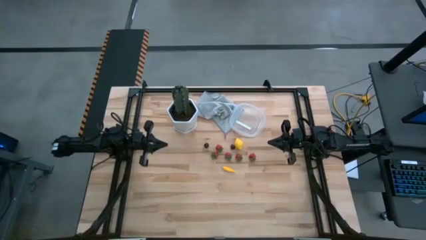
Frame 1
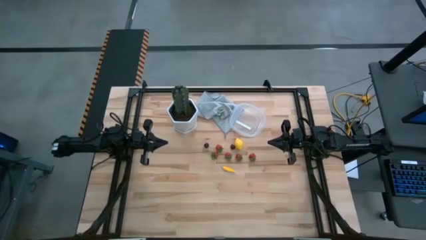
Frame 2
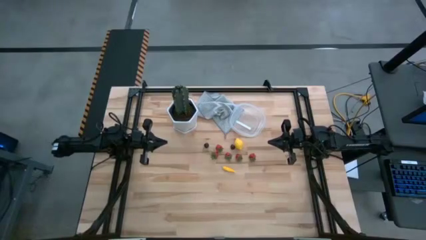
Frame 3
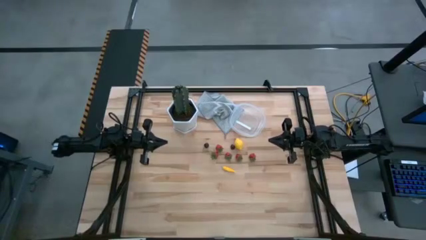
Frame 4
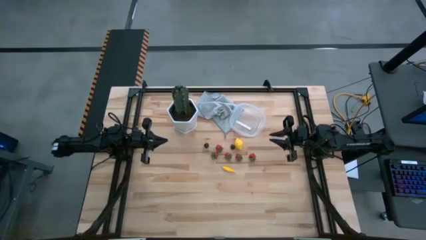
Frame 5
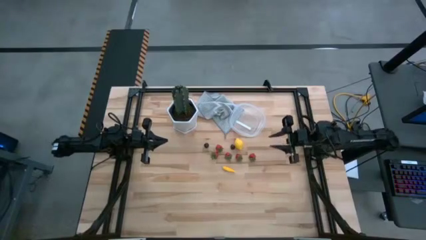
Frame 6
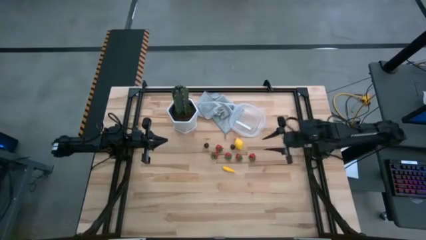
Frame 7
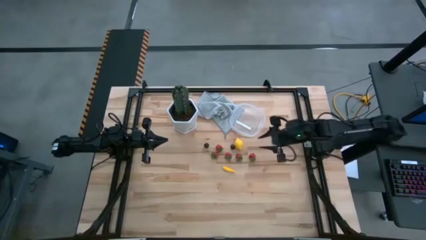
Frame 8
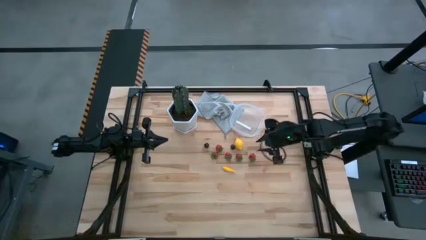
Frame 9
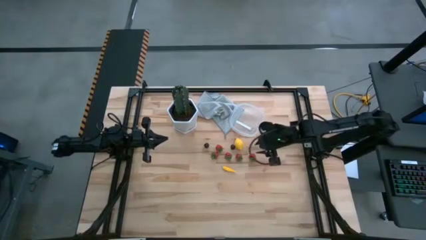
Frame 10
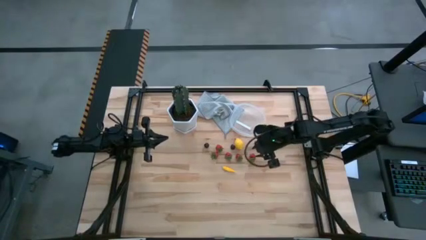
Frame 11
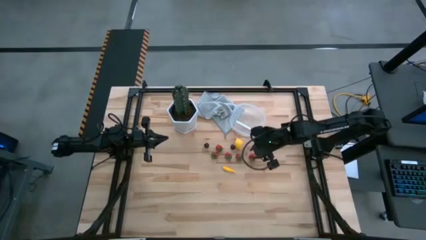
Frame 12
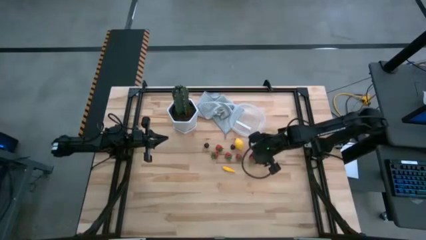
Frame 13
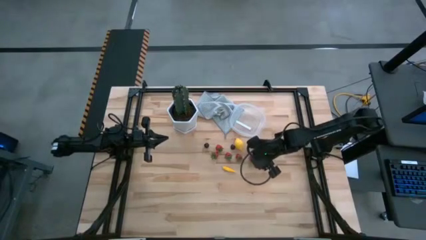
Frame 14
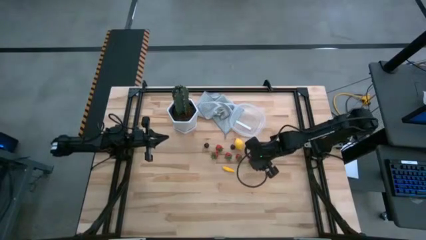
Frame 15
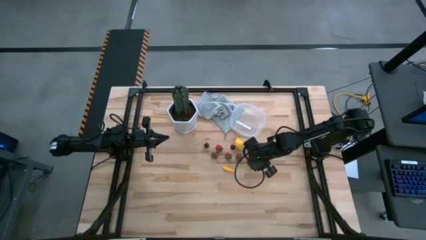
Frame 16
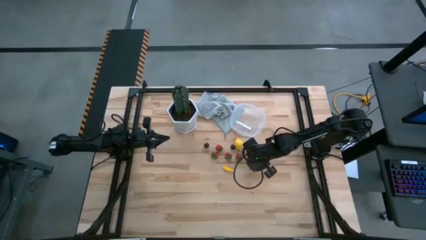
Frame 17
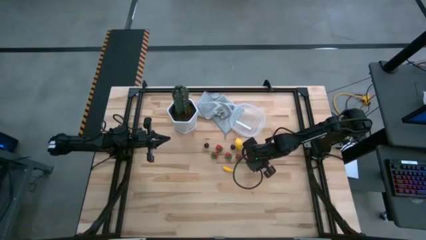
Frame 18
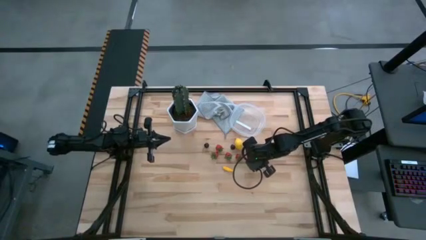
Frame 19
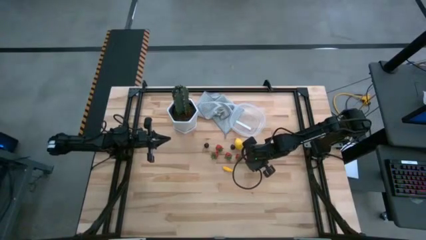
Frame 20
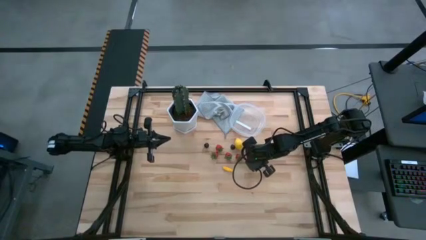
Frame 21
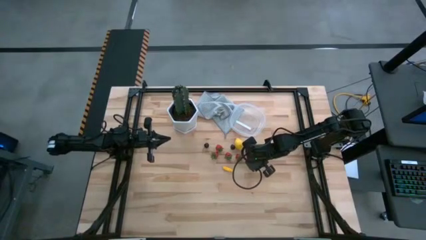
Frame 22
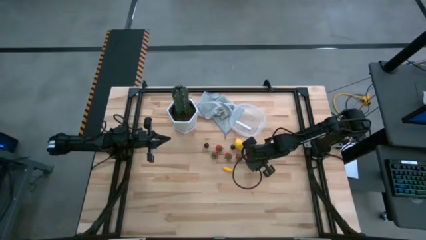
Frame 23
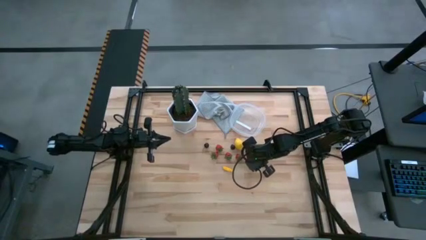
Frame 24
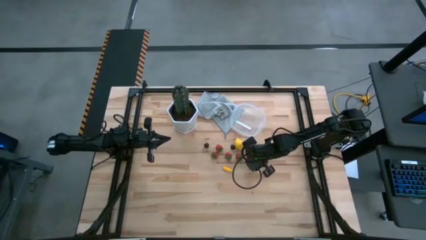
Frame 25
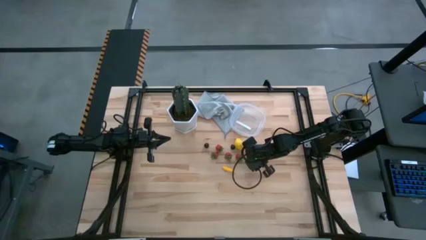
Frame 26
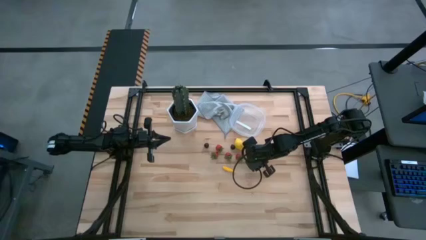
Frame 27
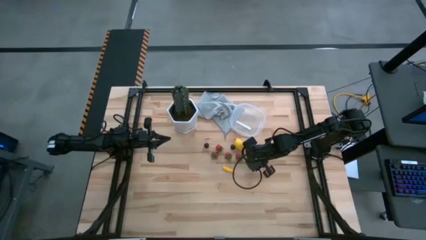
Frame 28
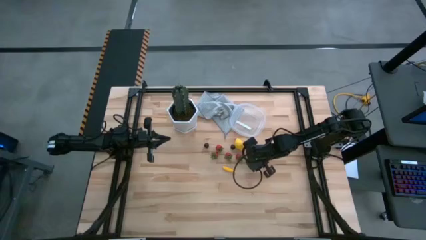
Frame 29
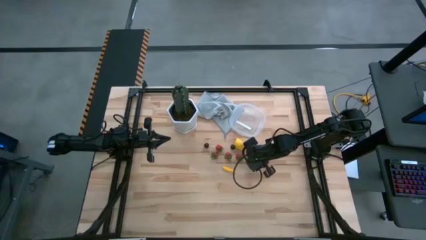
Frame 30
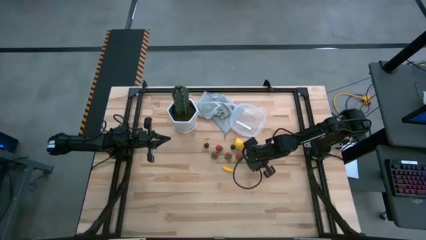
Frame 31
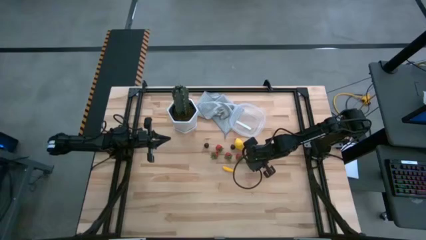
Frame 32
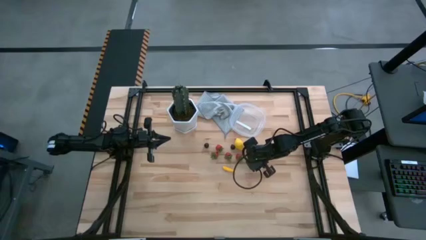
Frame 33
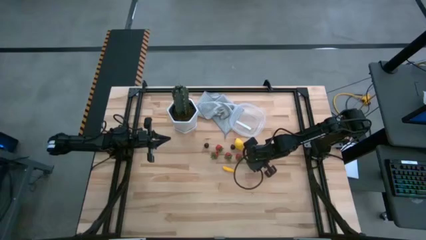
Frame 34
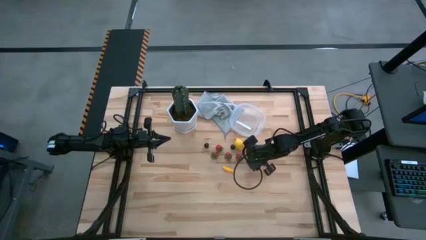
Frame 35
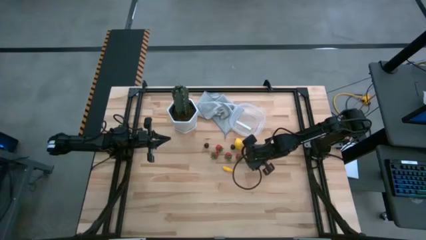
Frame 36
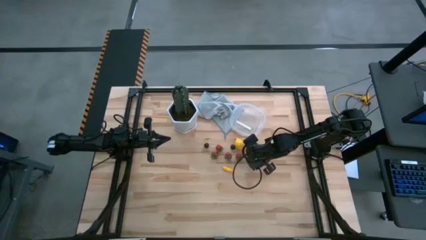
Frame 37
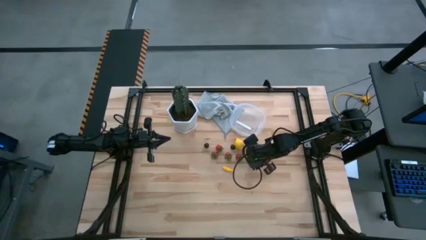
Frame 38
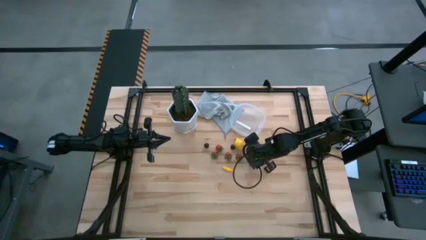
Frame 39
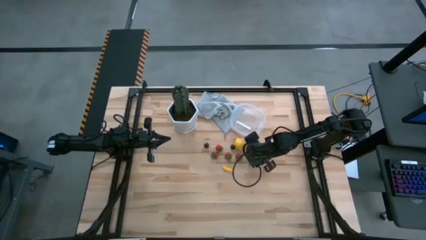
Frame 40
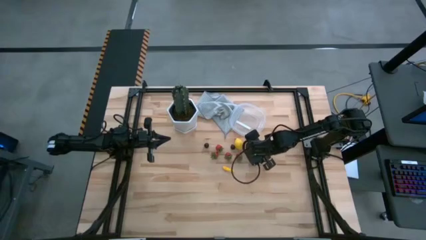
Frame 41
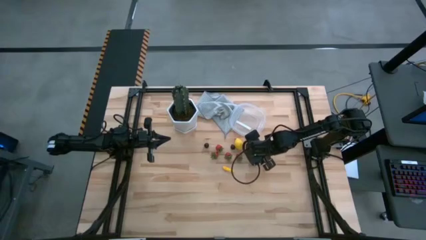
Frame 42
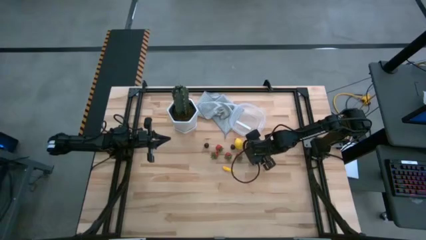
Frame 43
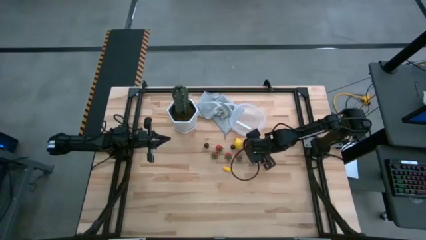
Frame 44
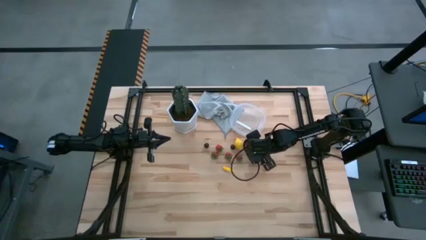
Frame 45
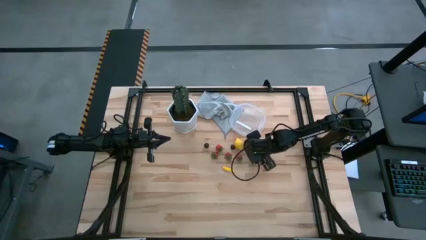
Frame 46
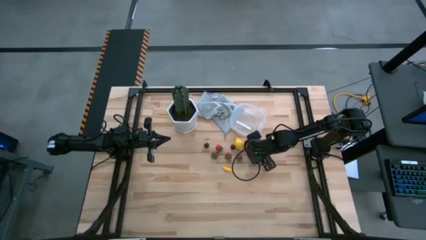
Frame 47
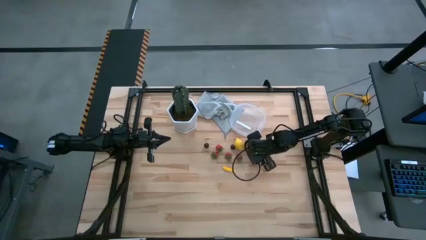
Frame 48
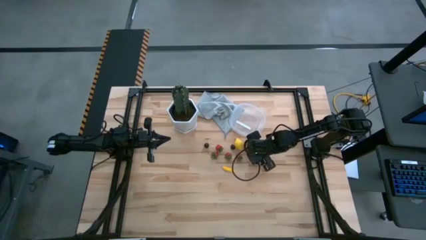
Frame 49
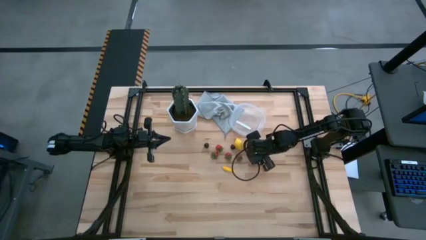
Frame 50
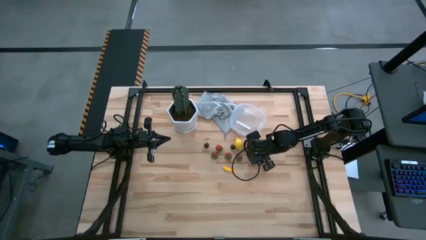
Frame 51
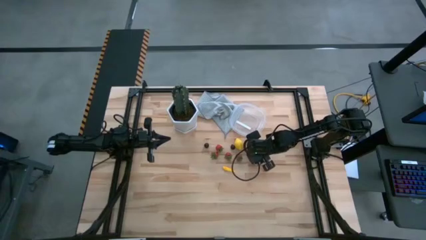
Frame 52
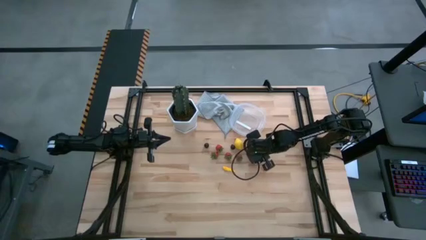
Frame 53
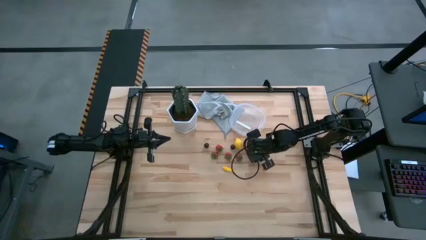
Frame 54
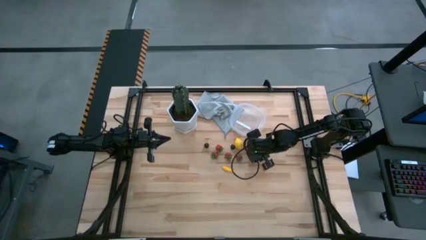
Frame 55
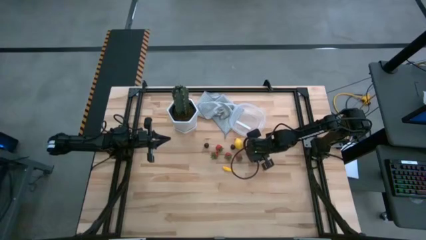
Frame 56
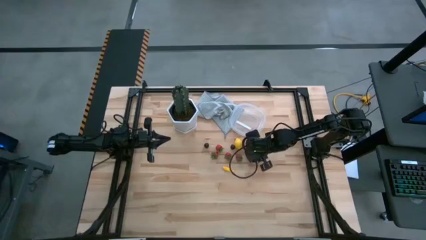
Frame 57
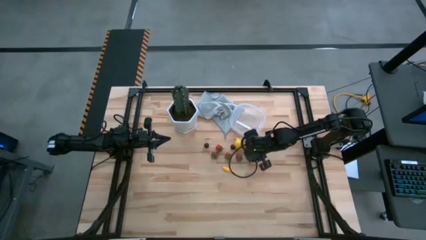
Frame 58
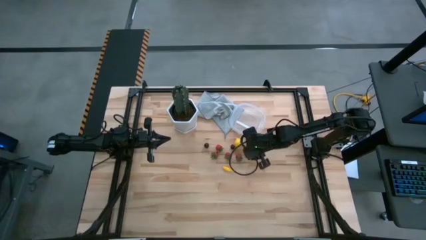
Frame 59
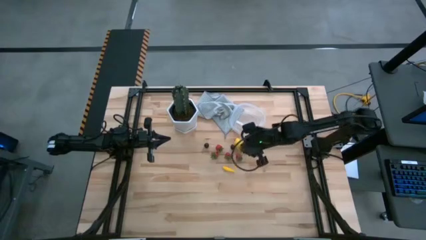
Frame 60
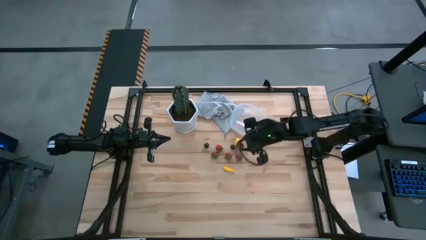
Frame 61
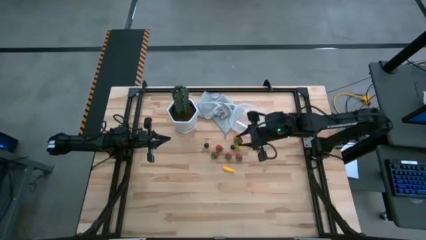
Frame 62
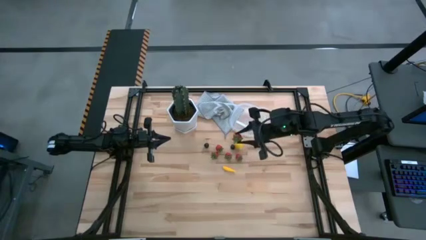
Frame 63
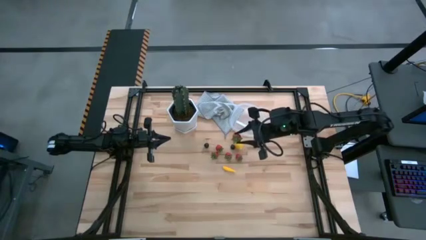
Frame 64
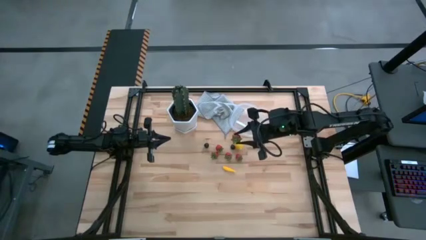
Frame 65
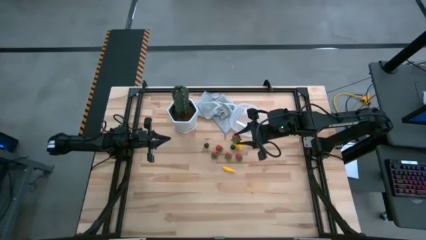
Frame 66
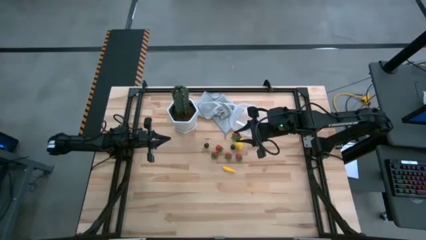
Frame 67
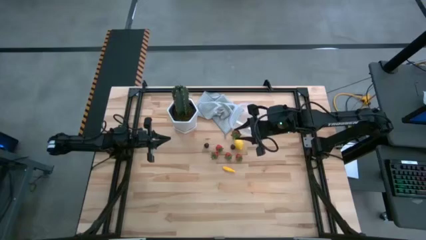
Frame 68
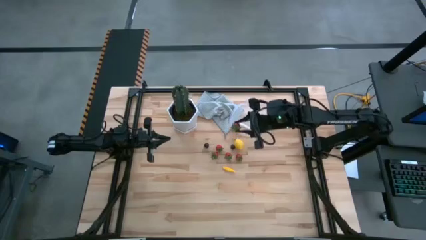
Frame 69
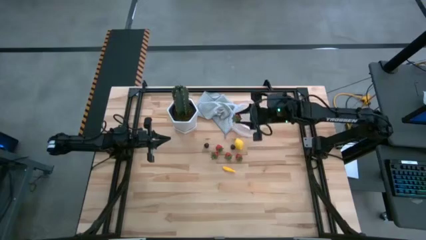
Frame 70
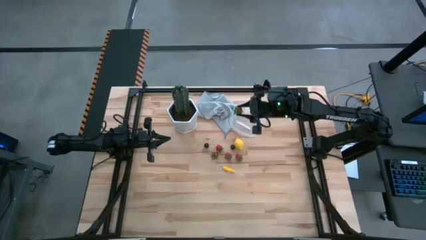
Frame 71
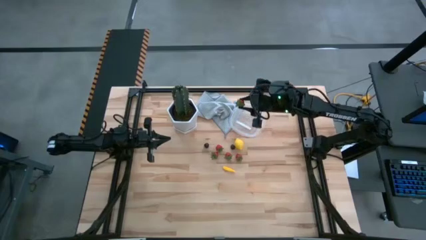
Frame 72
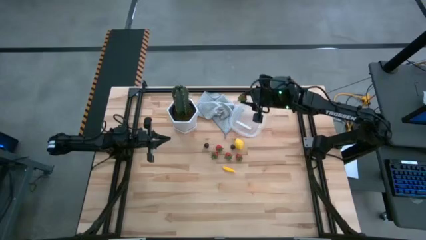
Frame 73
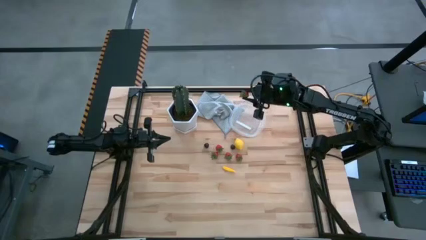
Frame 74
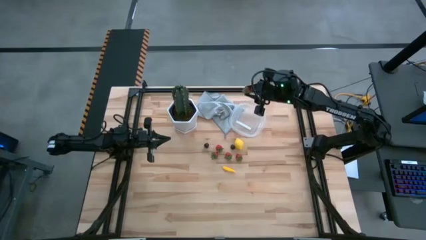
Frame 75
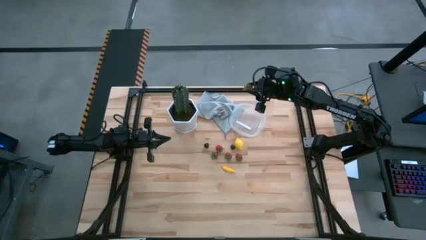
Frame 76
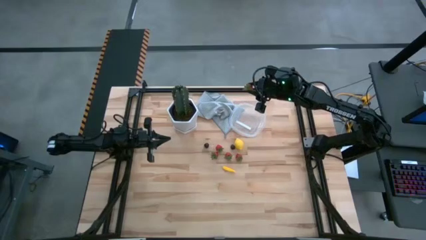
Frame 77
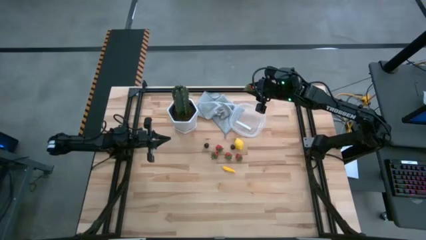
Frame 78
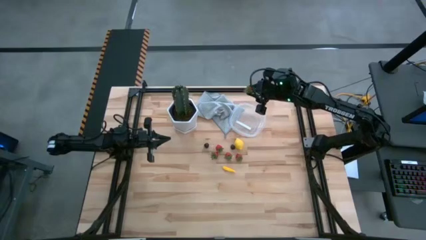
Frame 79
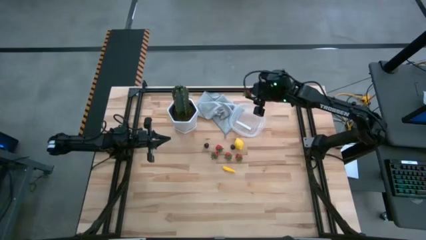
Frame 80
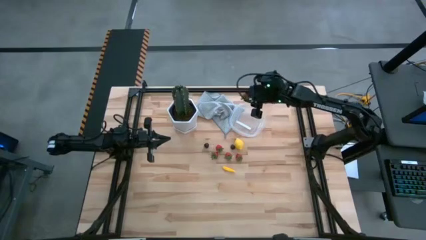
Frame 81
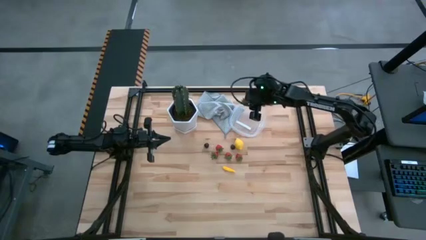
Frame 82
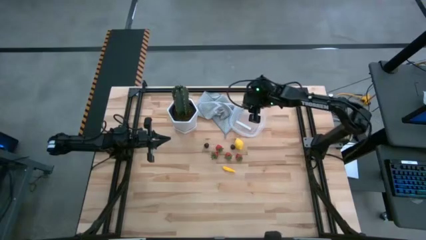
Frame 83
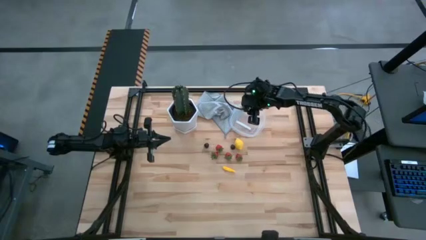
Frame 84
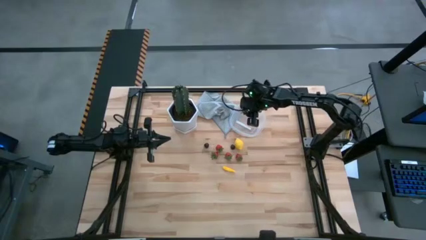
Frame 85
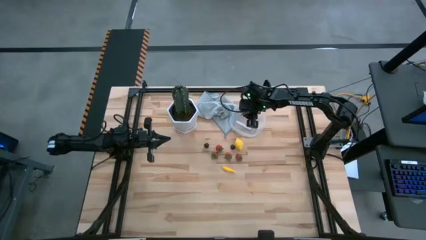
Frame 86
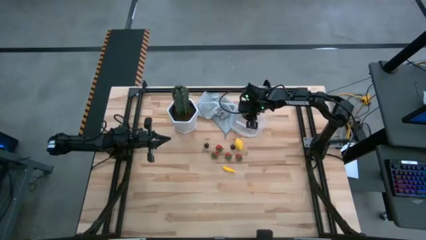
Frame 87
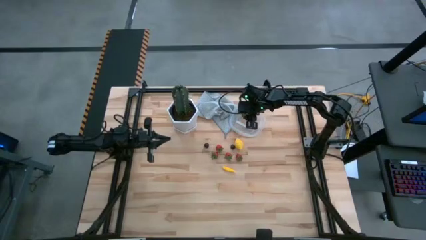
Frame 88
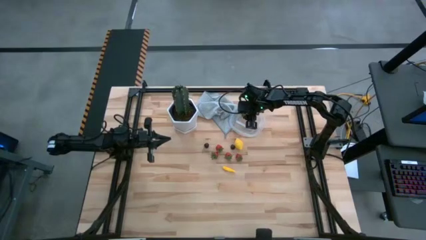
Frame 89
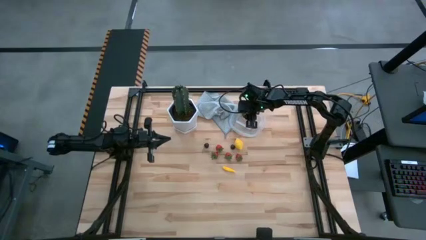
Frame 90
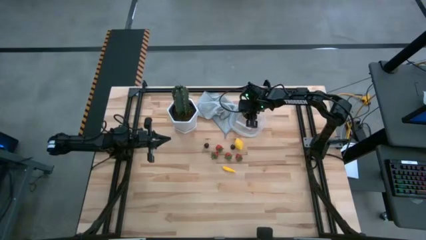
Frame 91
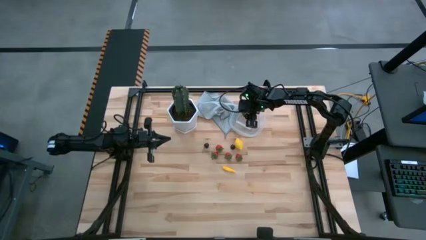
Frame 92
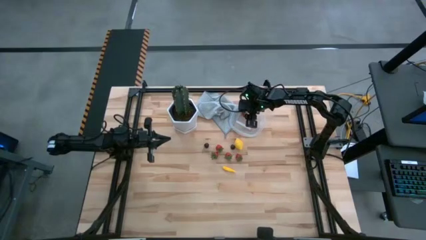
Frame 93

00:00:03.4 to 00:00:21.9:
Task: Pick and placing Produce into tupperware
Put the strawberry into the transparent bin
